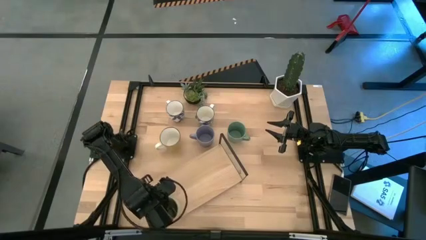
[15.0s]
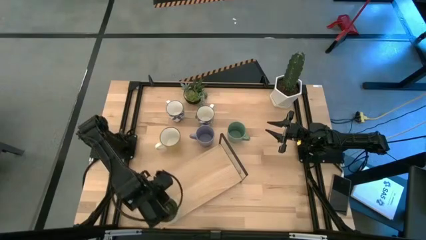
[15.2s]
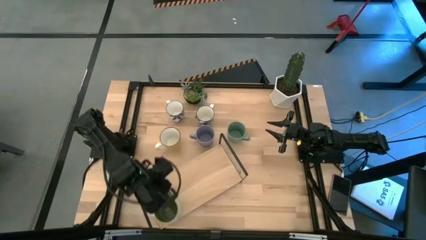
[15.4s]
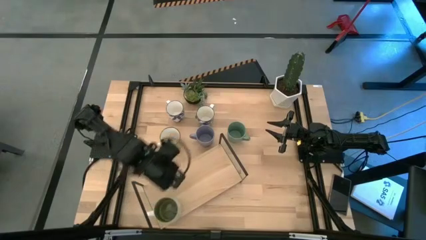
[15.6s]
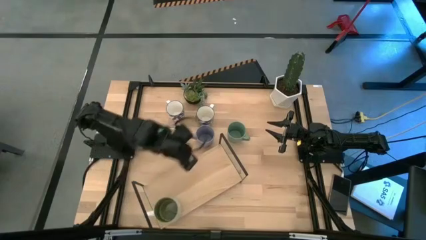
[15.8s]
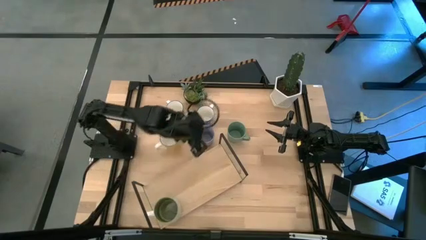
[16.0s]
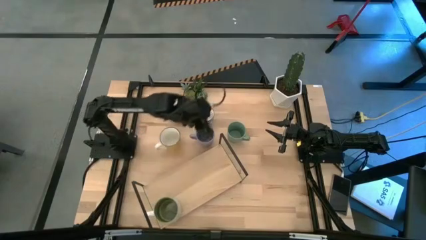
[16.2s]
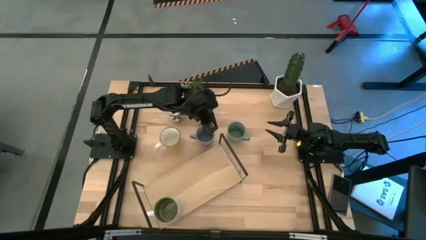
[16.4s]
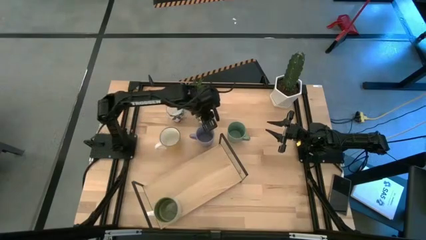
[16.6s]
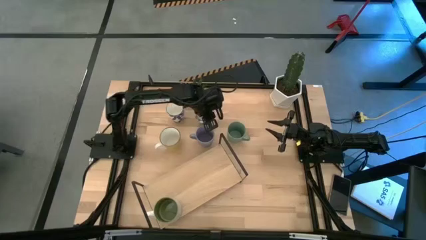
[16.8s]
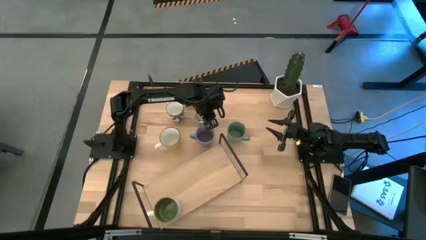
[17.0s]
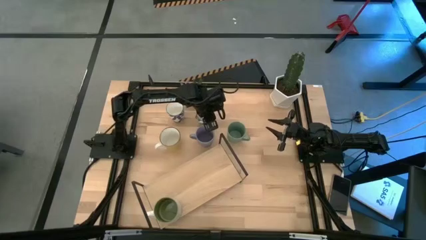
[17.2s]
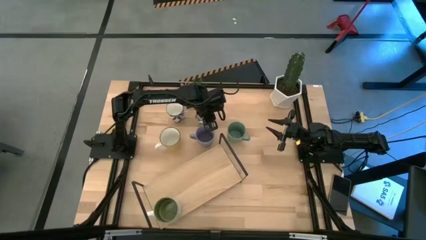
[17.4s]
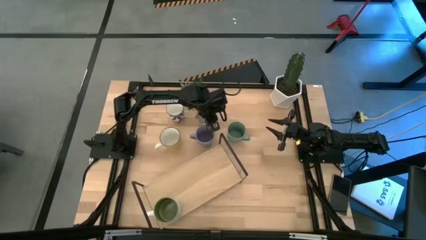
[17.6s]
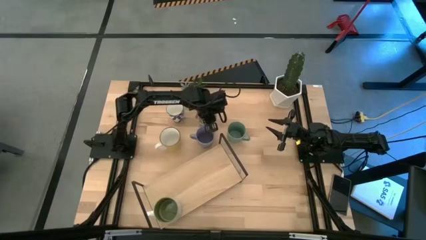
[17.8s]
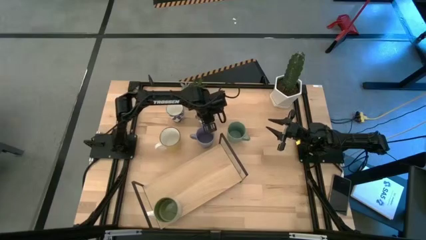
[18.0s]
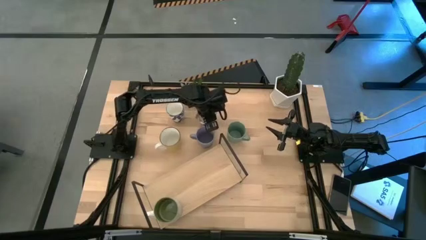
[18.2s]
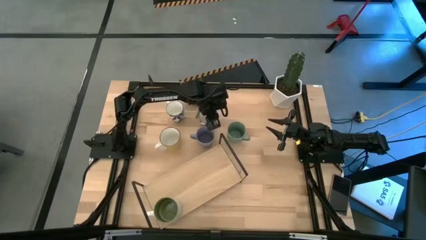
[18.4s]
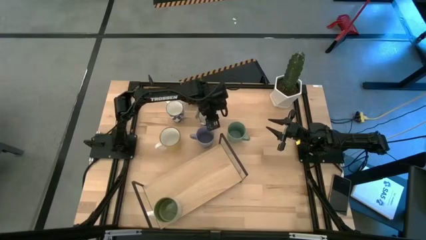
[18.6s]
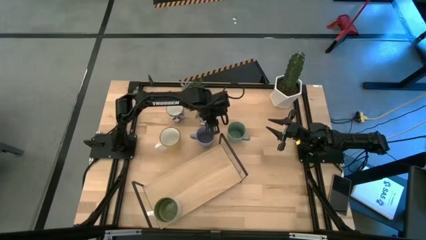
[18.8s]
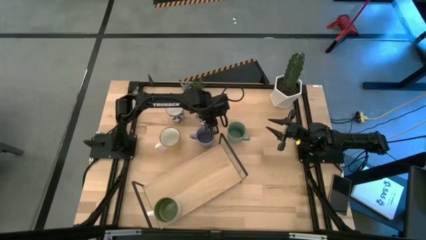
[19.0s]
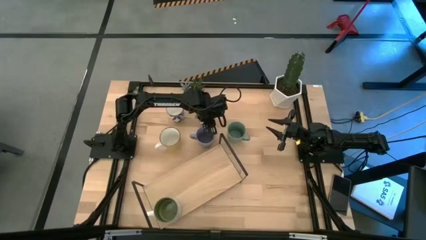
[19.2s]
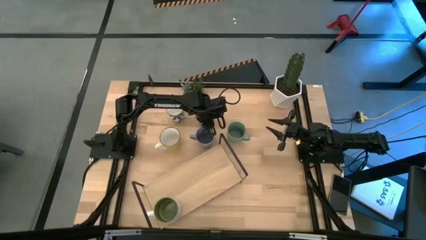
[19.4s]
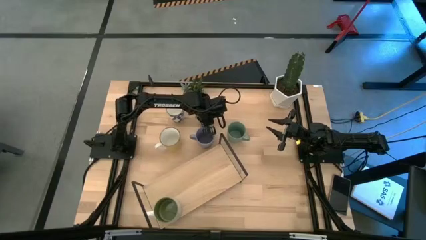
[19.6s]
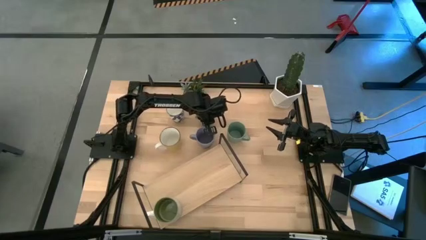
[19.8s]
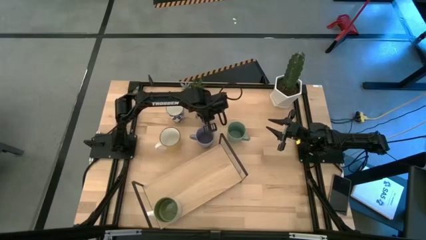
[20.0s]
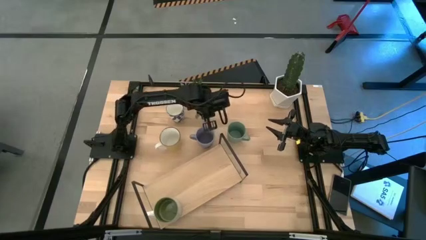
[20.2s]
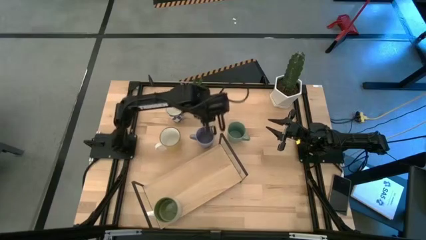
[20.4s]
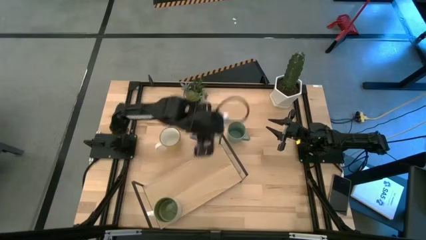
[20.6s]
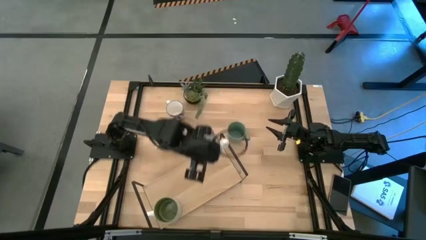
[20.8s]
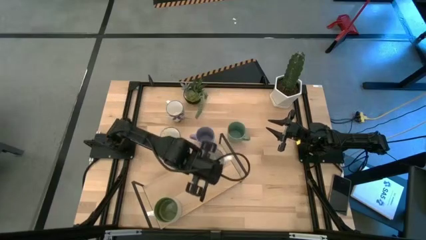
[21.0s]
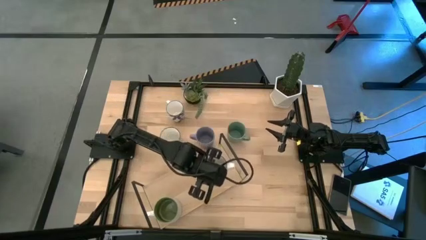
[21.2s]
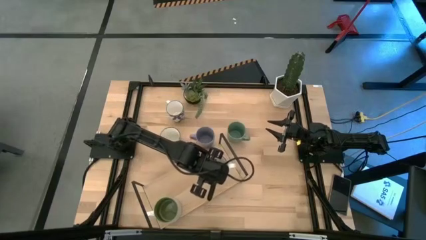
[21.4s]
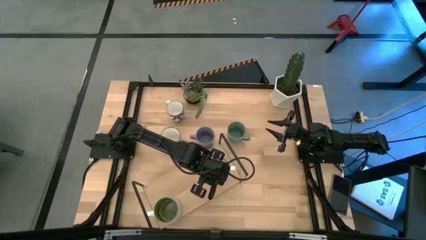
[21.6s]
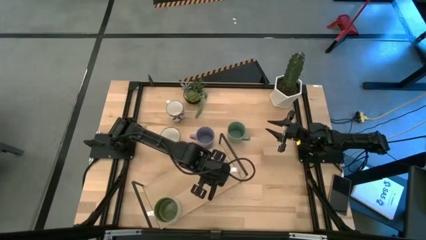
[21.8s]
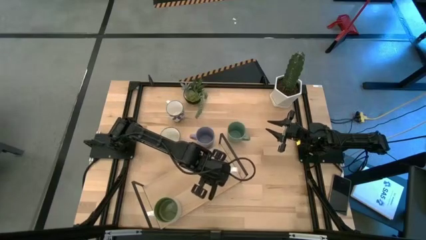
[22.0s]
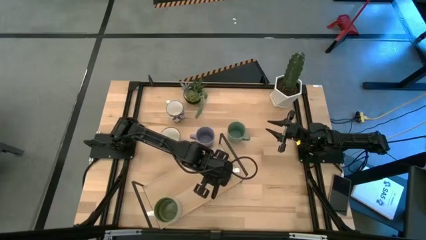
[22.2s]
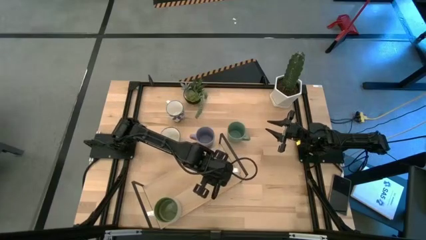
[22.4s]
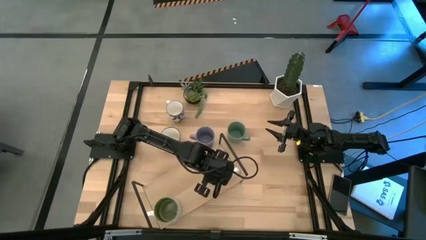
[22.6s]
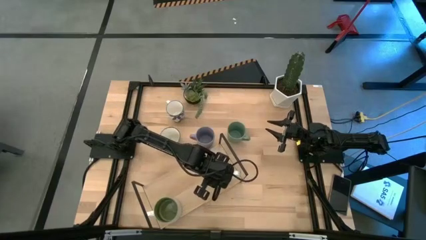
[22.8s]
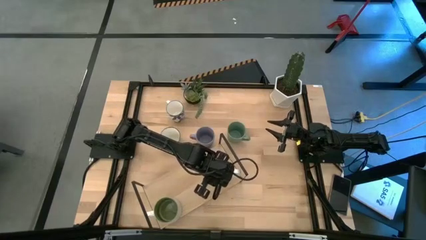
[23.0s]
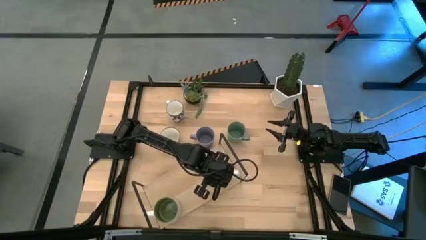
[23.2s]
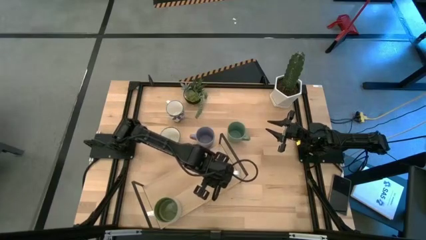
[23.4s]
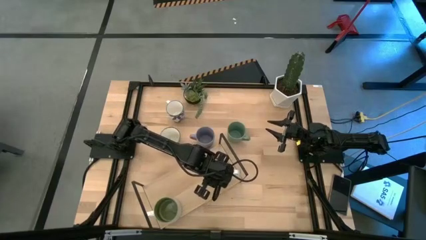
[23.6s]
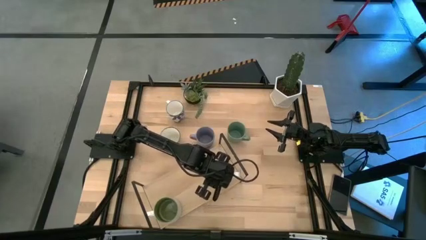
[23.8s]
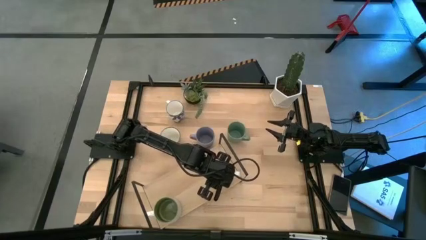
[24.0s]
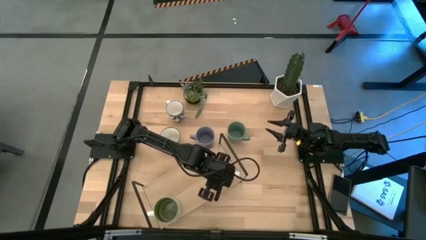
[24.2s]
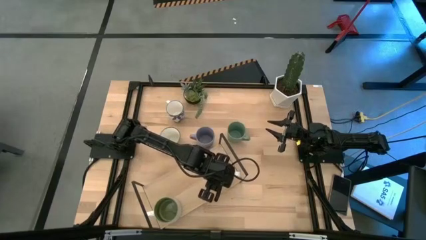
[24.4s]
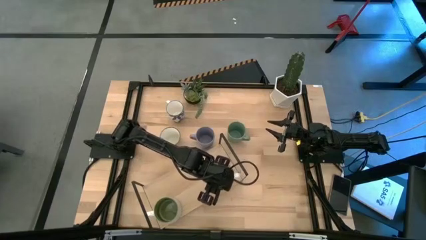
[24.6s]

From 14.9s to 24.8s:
Task: Place coffee mugs
Put the right white blue patterned mug at the bottom right corner of the shelf

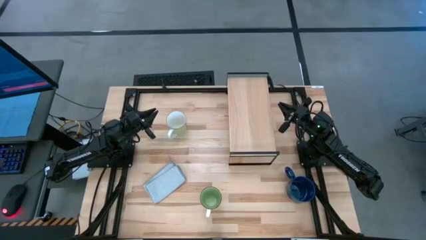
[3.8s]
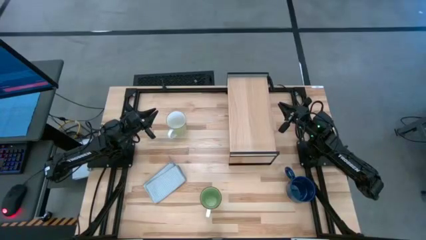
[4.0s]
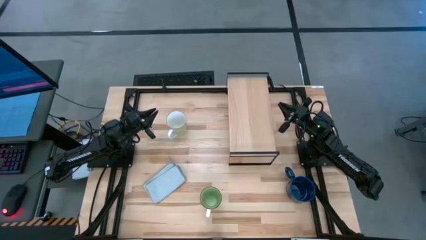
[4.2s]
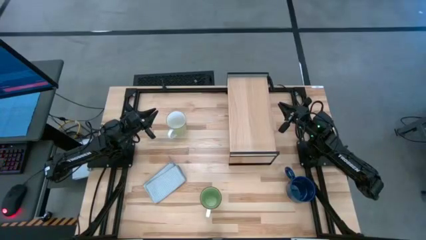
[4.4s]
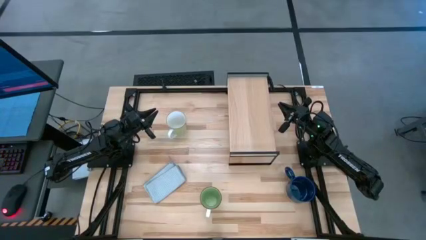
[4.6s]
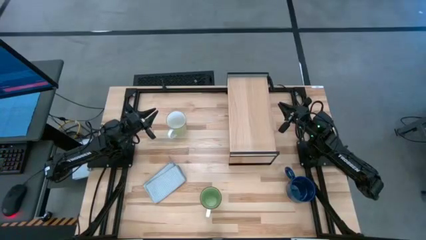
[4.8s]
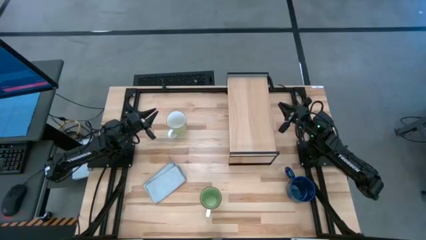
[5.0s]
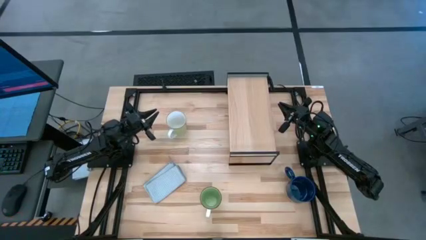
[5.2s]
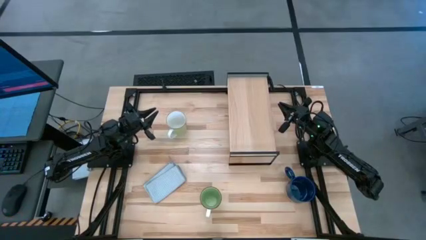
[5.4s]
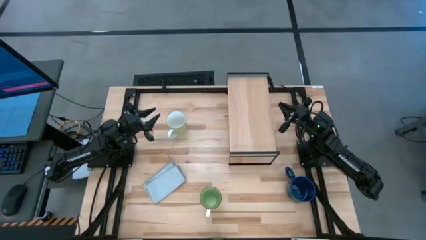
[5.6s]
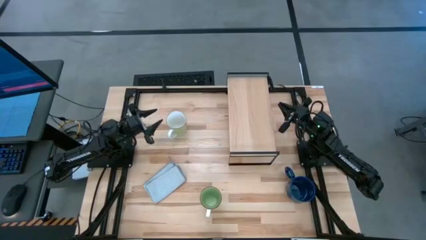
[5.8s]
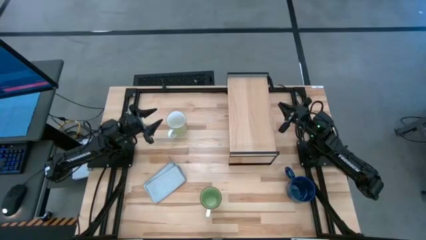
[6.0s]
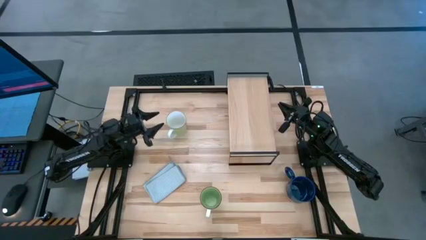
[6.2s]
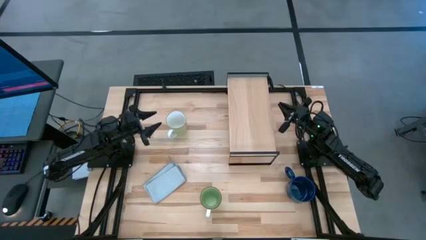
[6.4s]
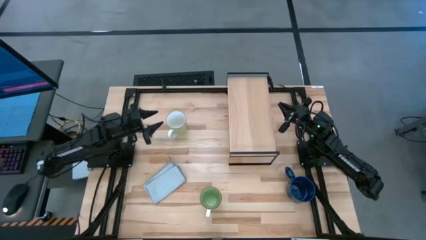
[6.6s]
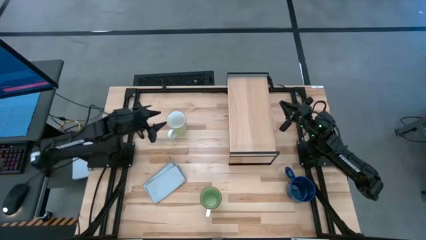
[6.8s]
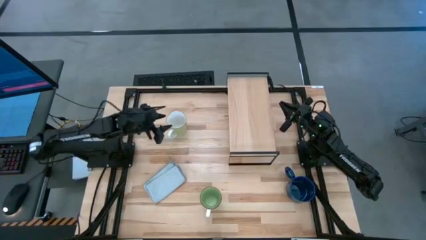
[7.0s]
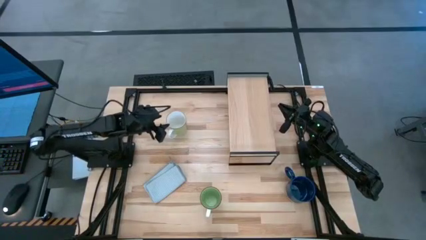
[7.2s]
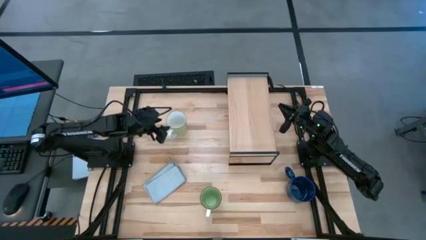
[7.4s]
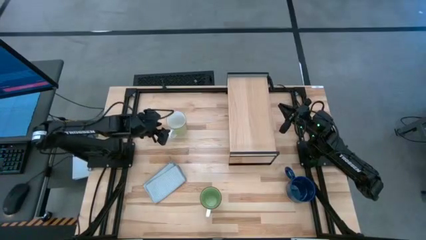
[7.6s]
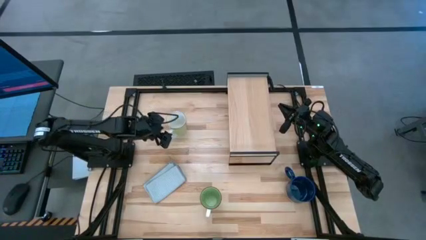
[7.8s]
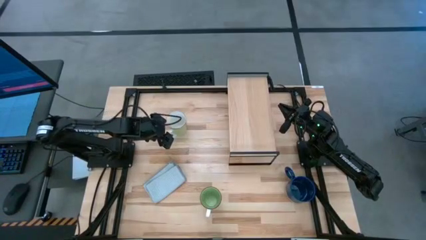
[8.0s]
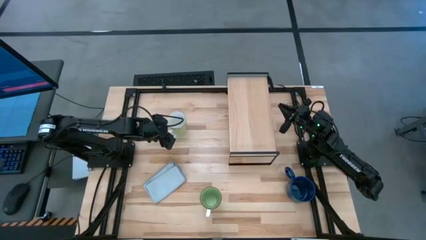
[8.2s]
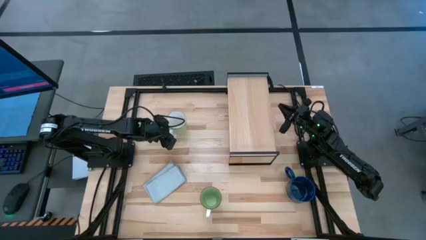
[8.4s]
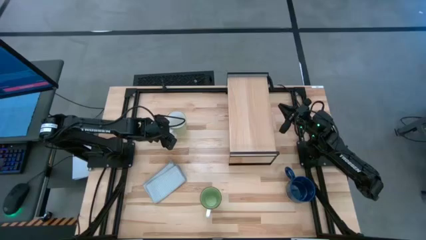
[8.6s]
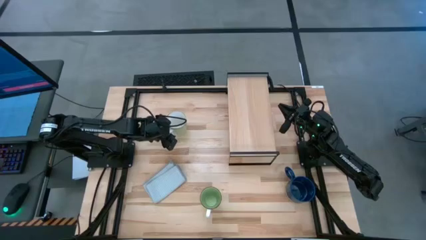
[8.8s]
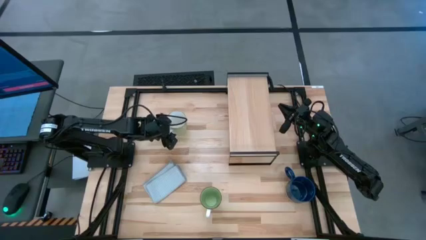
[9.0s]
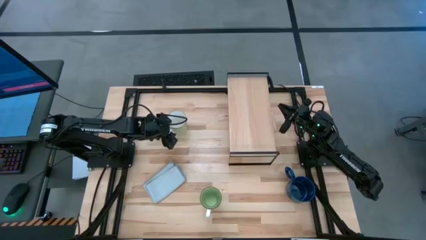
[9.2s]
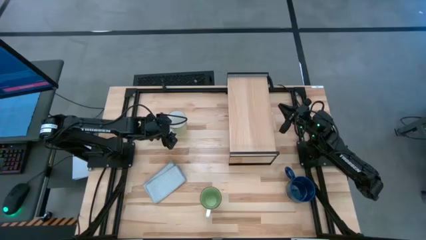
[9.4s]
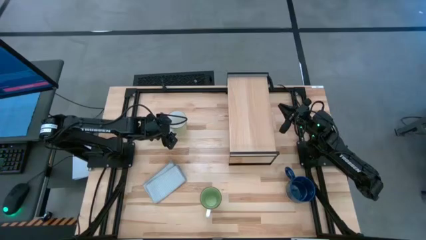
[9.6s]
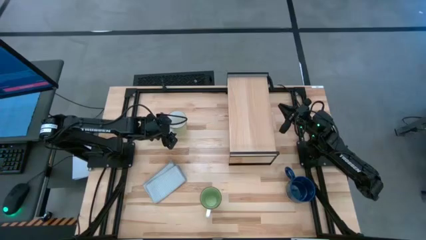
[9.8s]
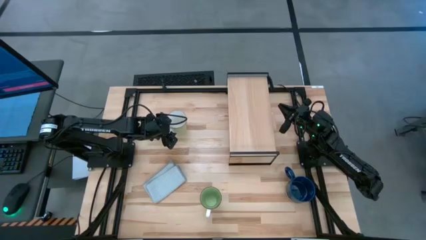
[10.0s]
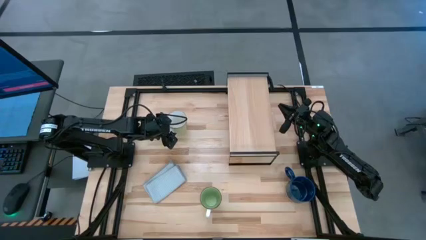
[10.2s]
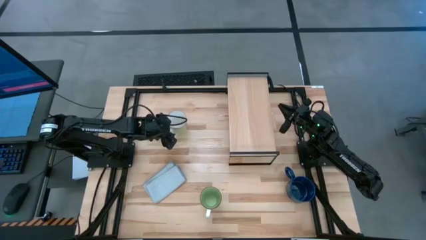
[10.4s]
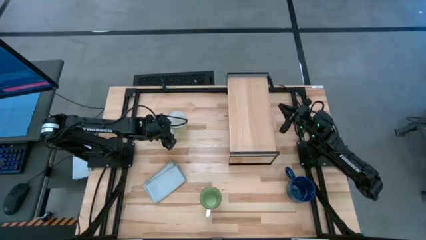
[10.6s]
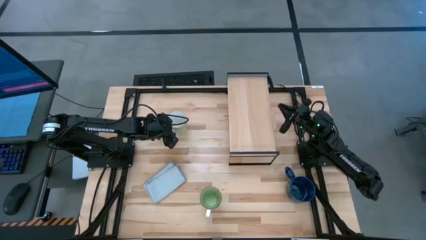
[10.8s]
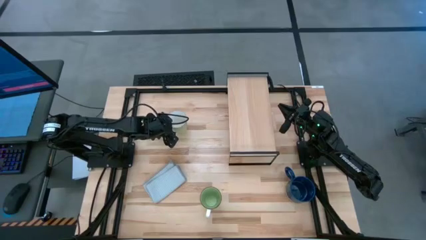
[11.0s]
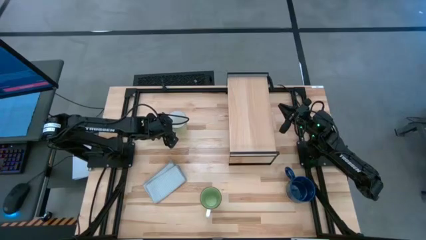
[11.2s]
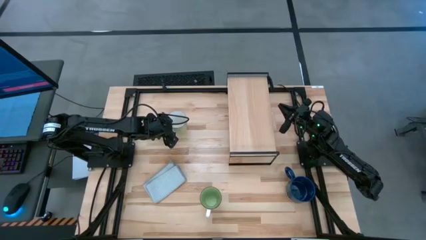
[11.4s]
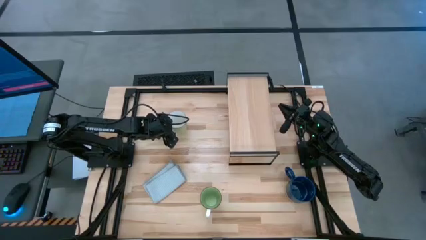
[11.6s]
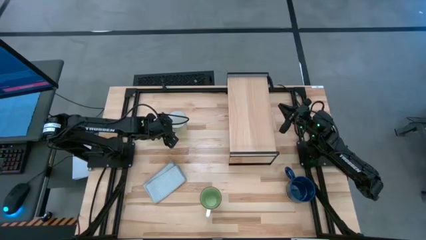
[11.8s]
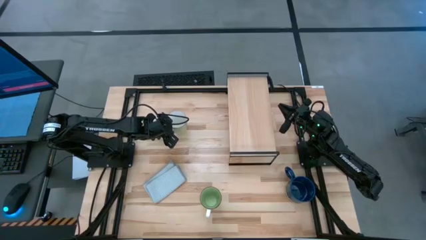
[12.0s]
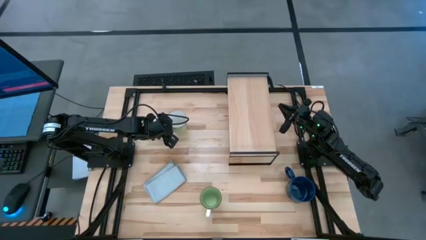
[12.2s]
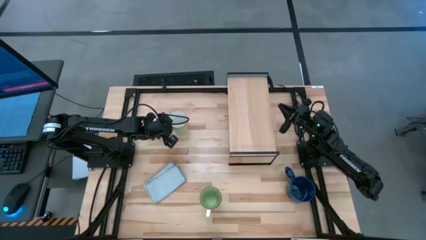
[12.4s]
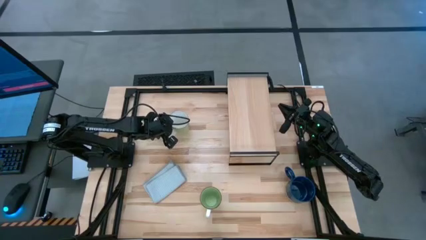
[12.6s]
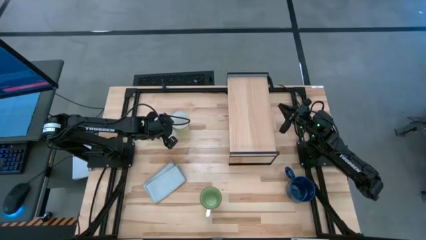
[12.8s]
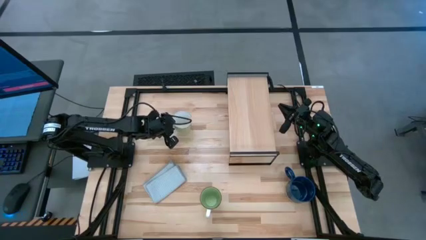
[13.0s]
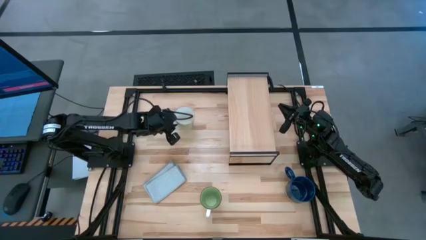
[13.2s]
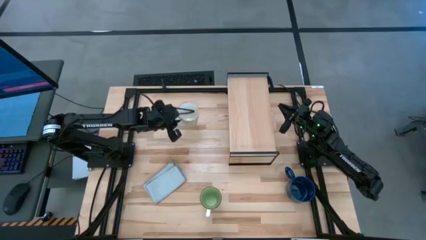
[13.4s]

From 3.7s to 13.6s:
Task: Stack small to large cups/mugs on shelf
Put the light green mug on the shelf
